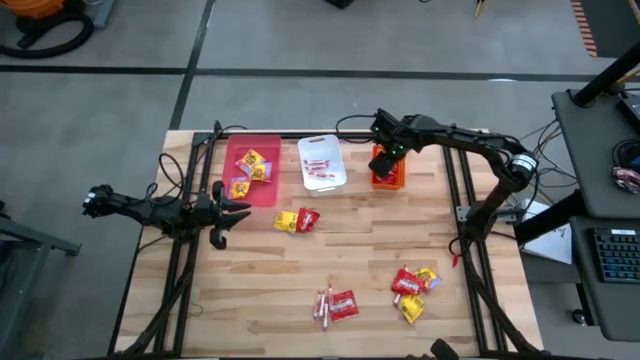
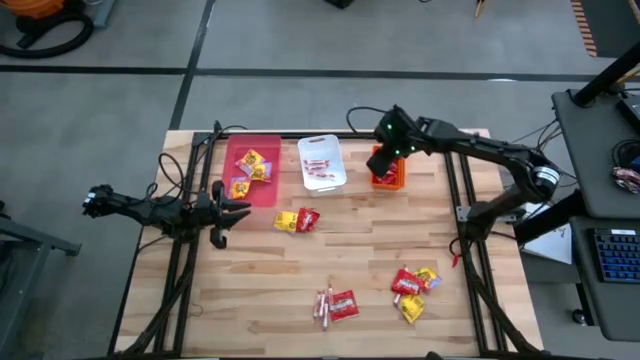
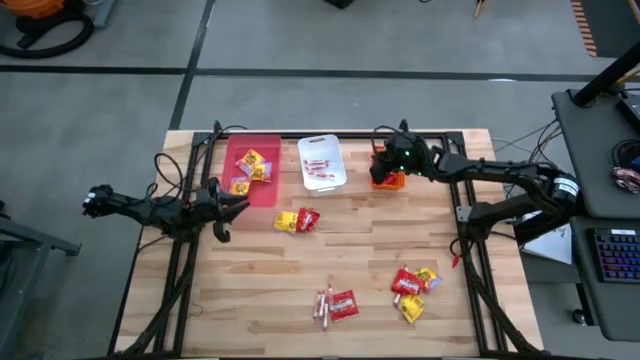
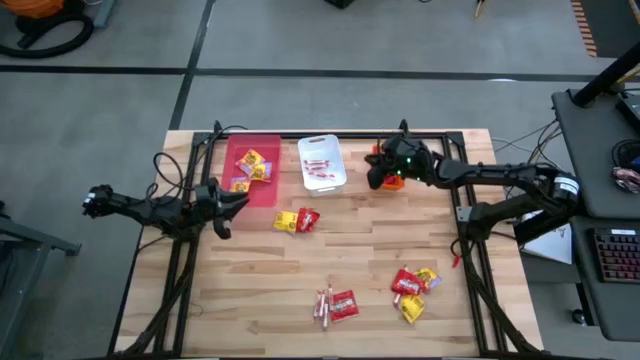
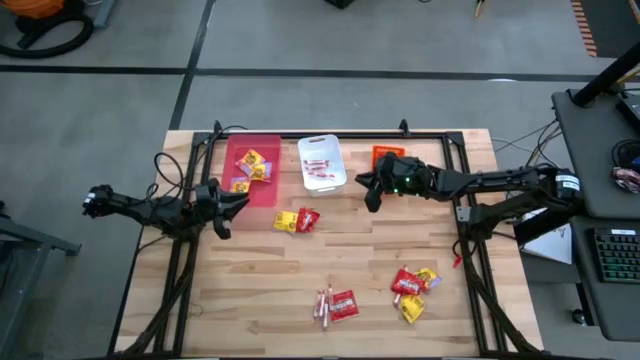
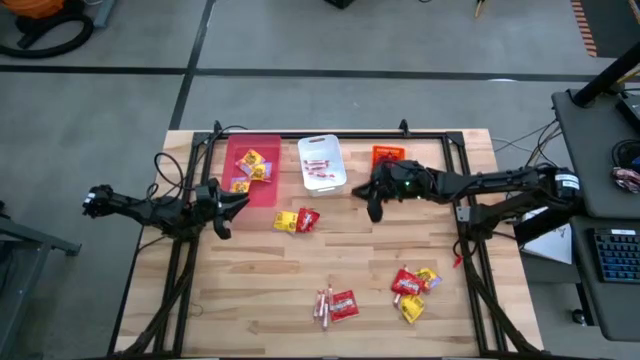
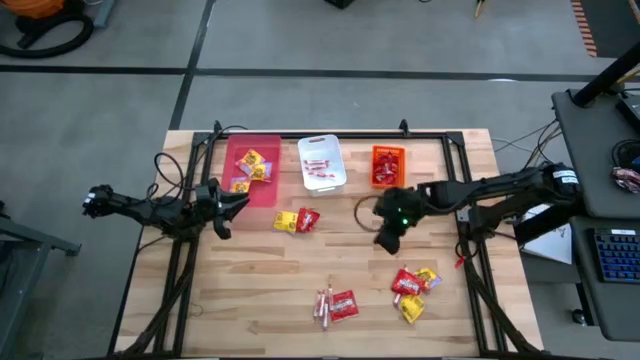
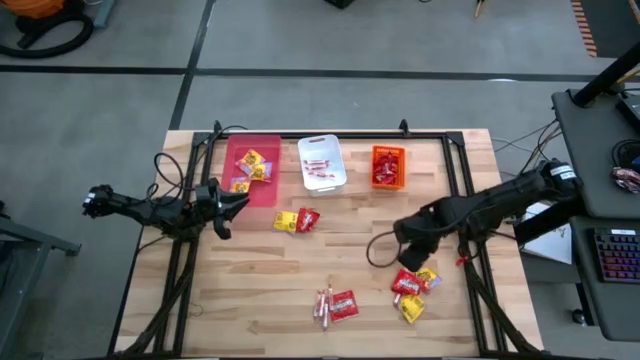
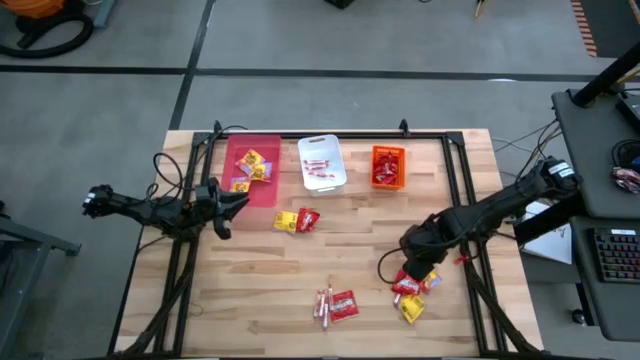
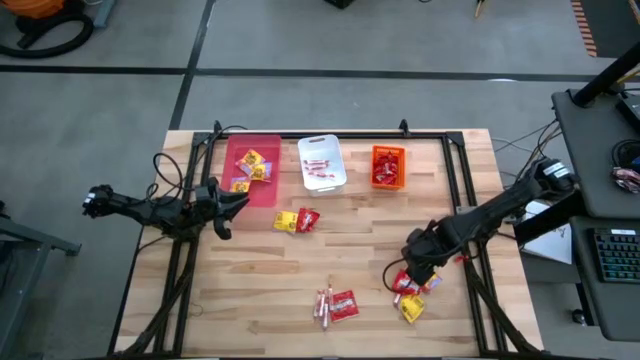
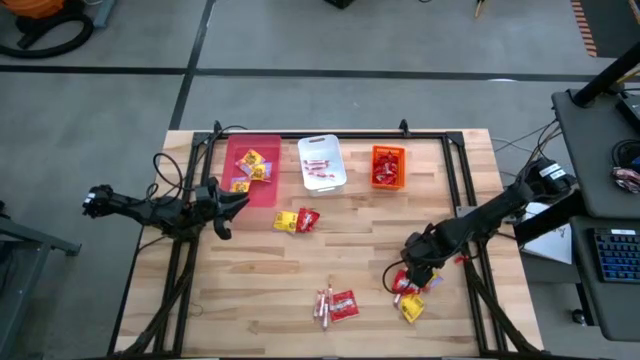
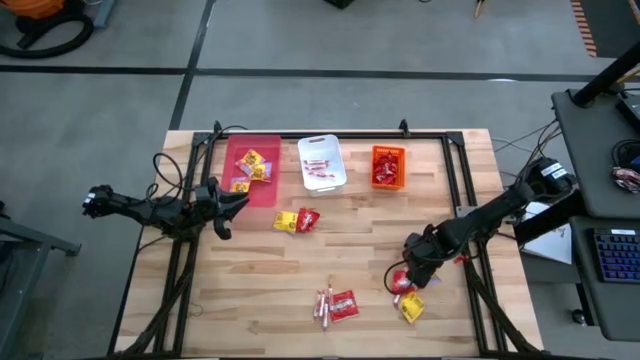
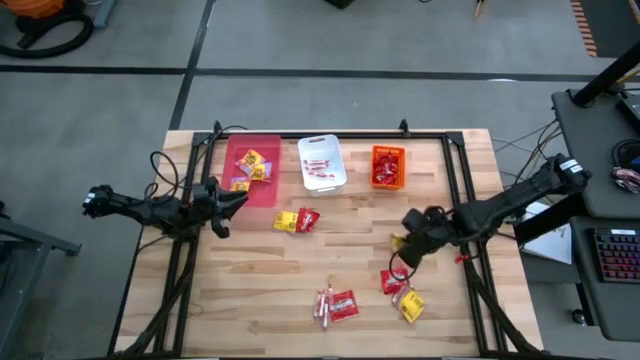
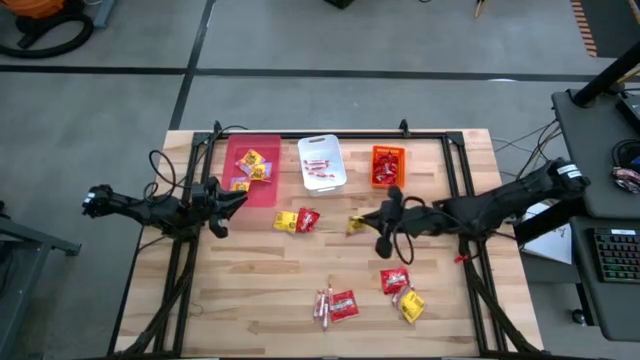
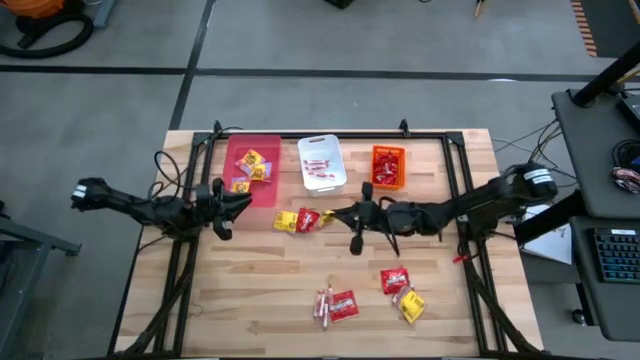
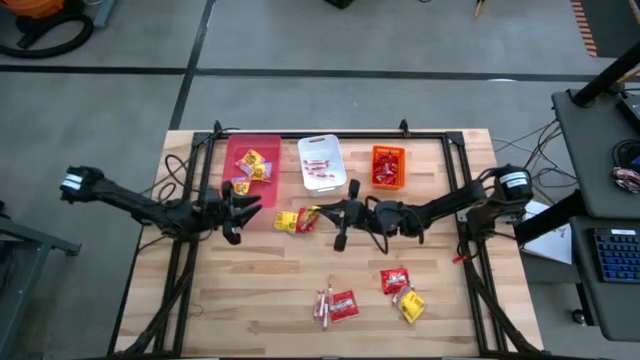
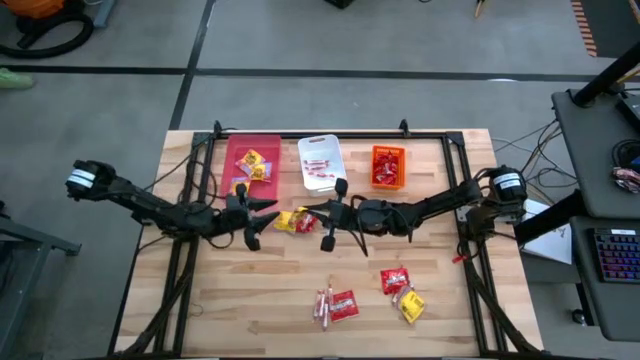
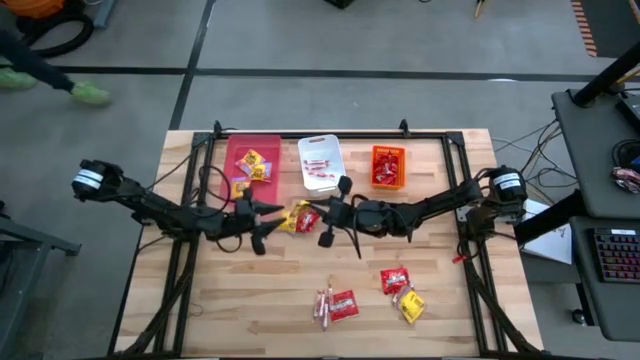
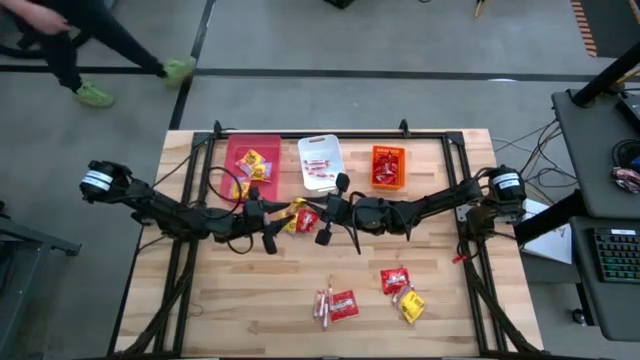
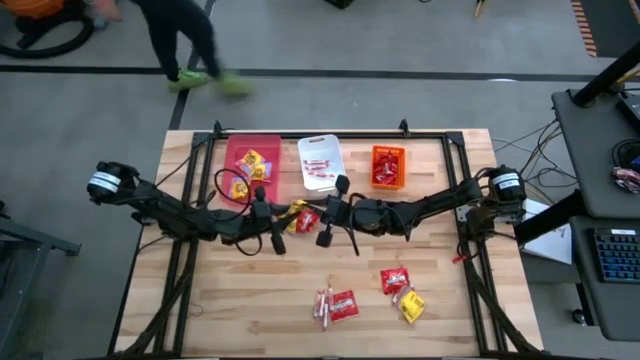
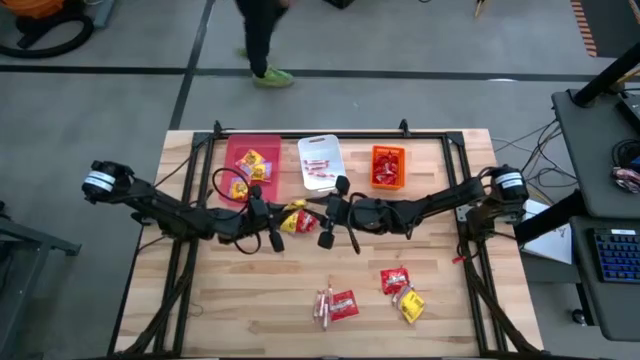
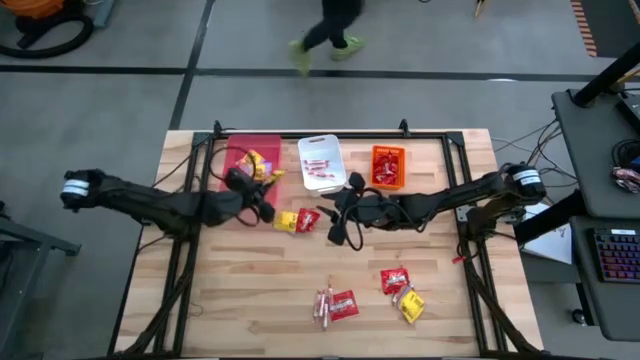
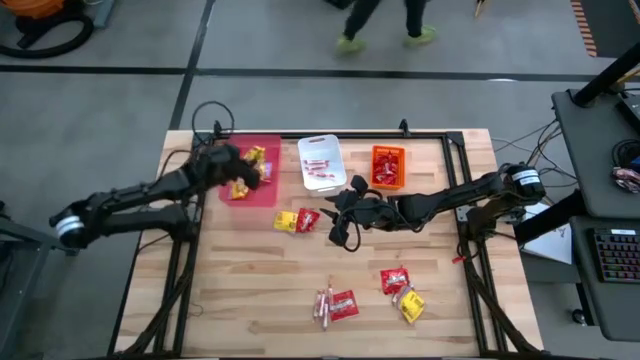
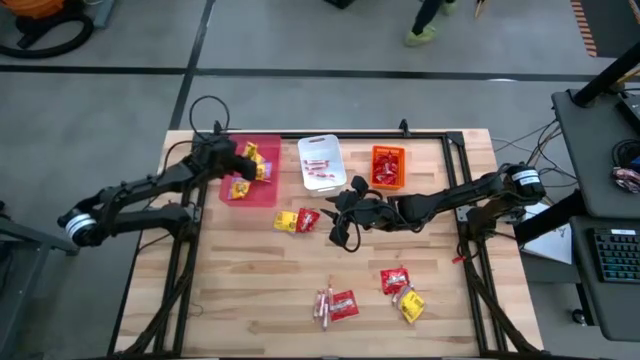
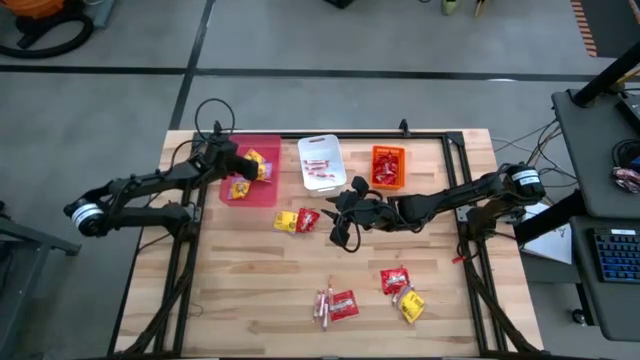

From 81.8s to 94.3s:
Task: Sort candy
Put the yellow candy into the pink bin

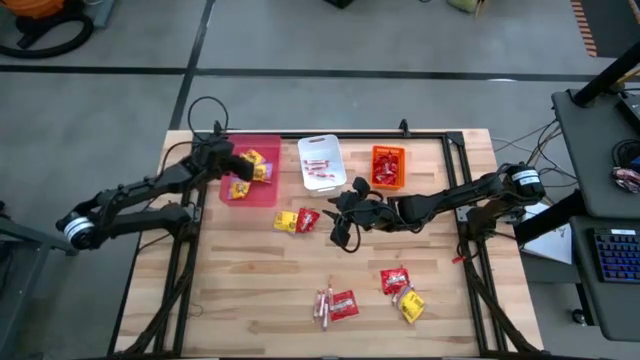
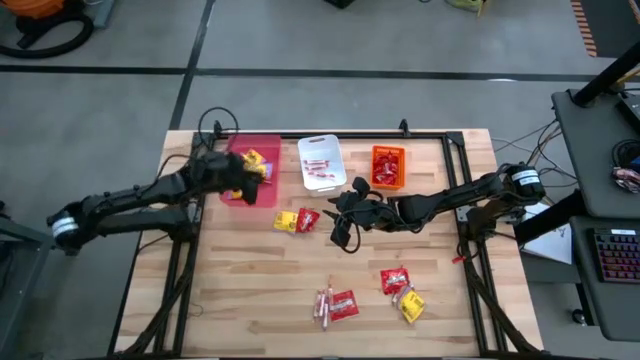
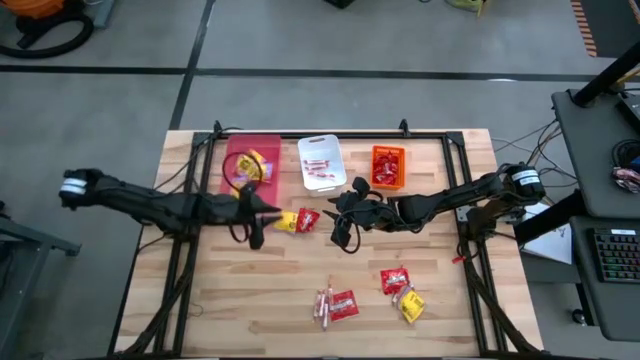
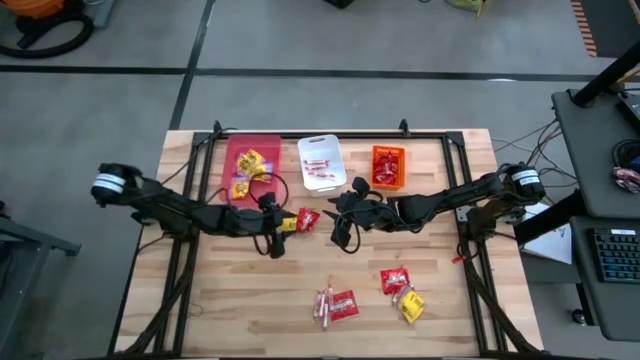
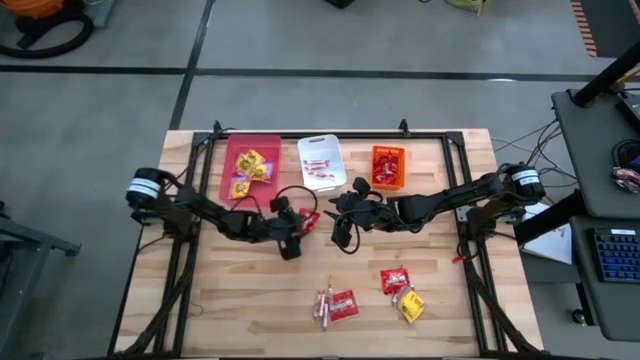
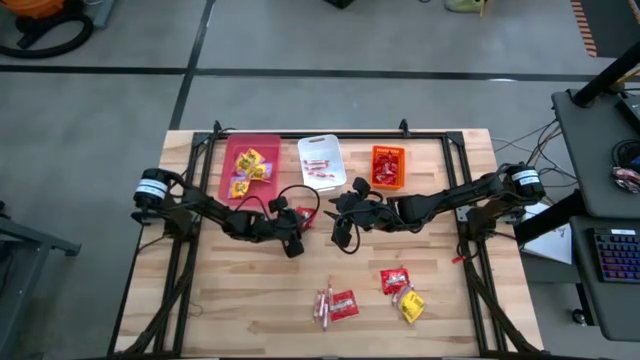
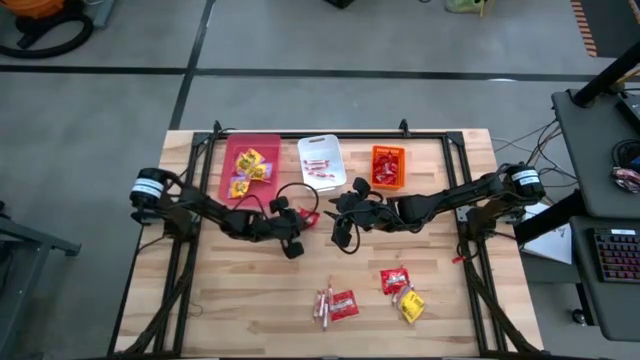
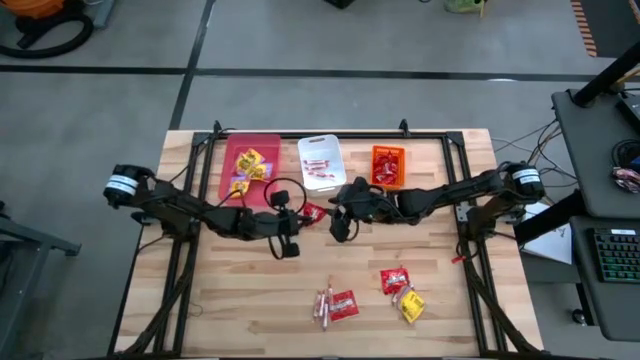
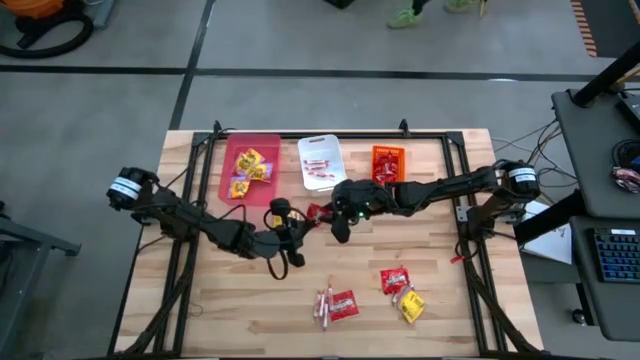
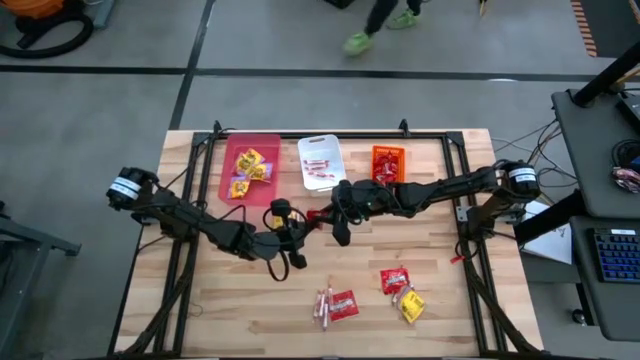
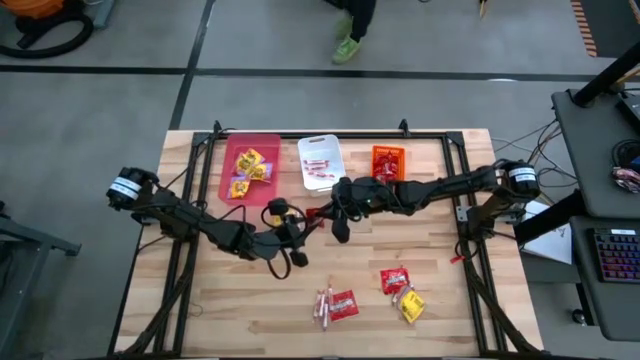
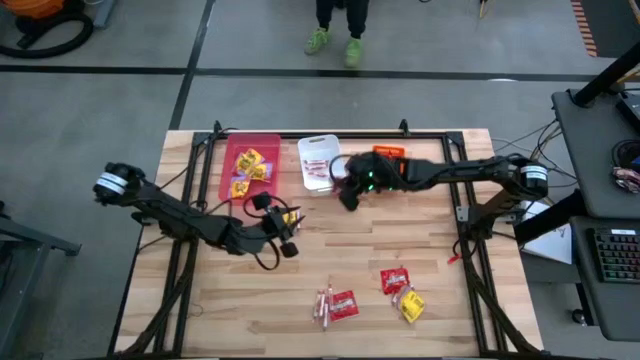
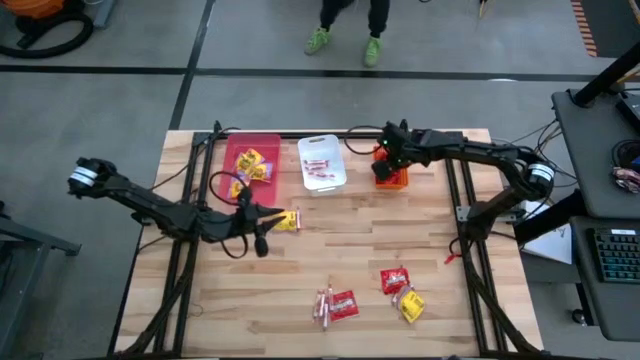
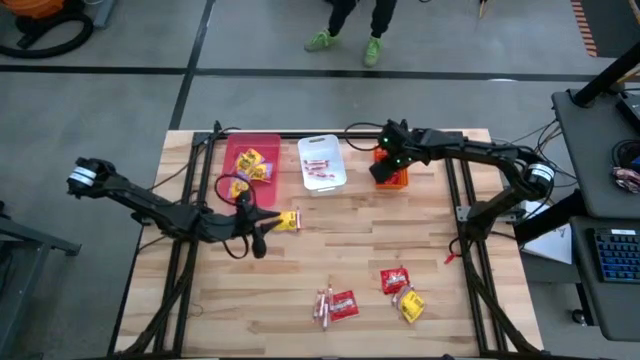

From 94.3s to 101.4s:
Put the red candy into the orange bin

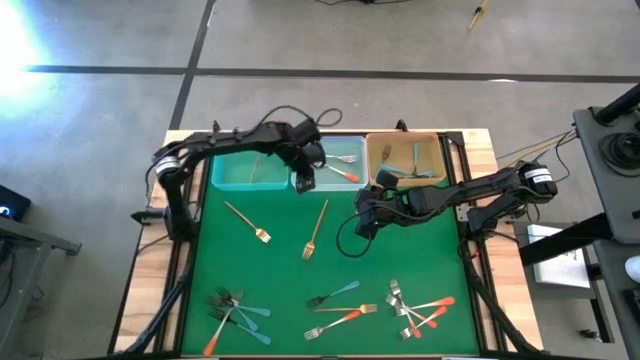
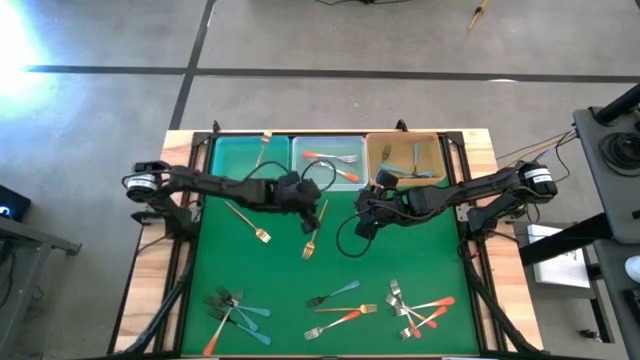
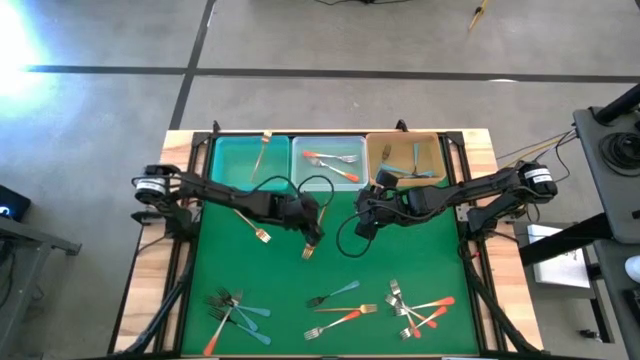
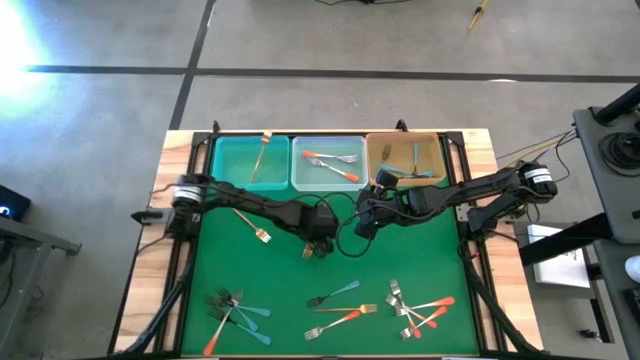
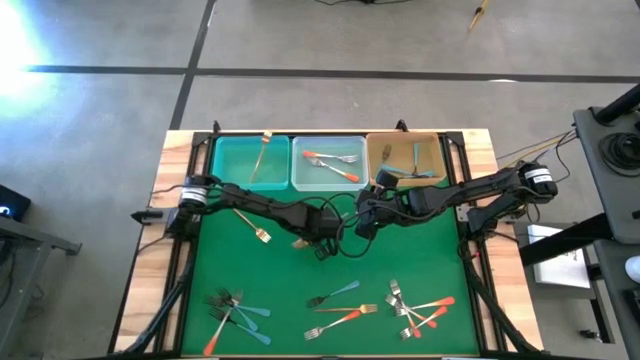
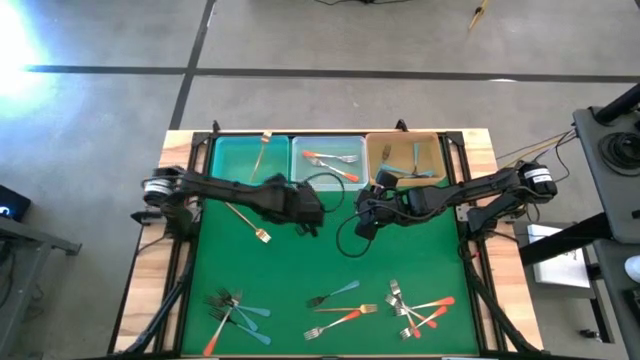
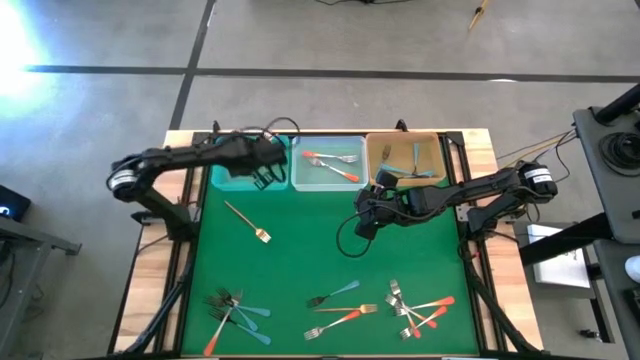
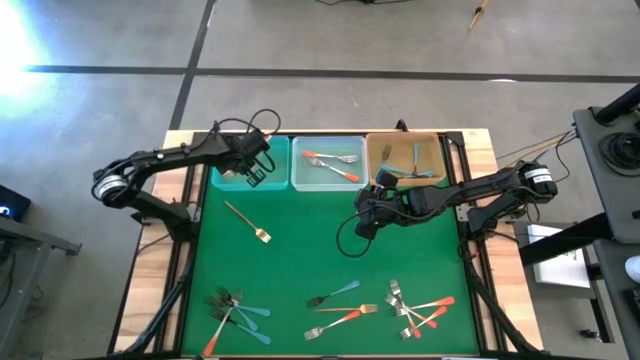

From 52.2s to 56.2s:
Task: Sort silverware by color (type)
Put the gold fork into the blue bin
